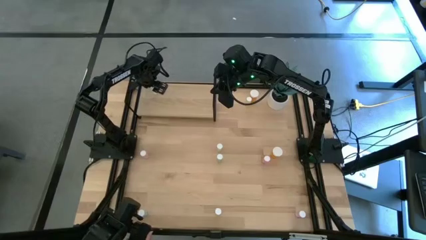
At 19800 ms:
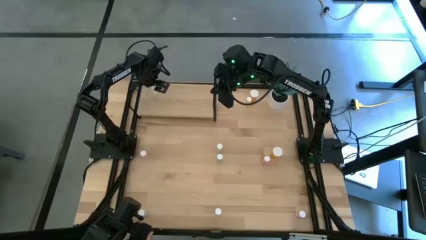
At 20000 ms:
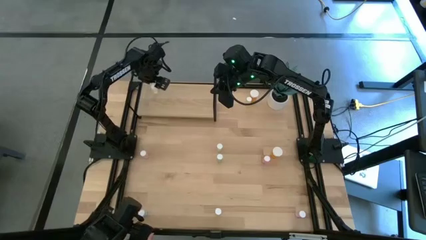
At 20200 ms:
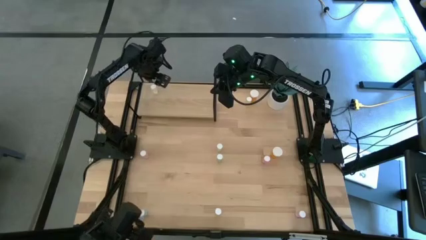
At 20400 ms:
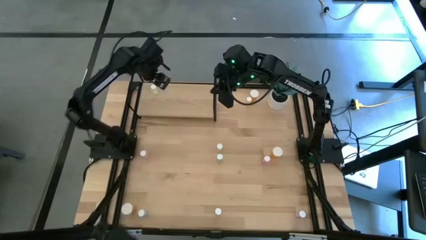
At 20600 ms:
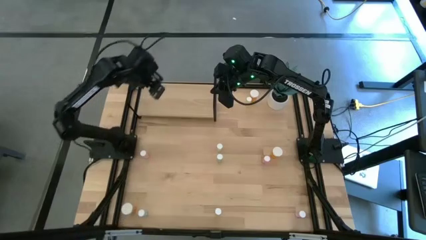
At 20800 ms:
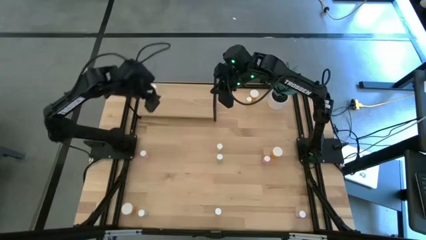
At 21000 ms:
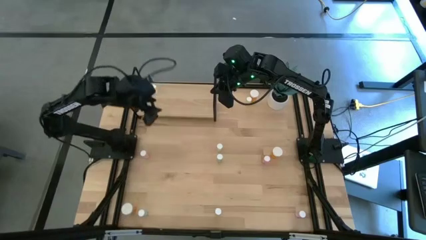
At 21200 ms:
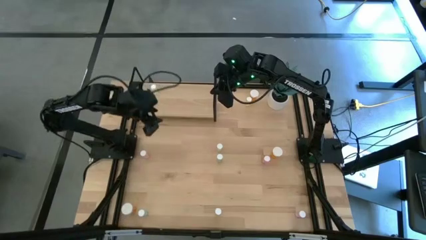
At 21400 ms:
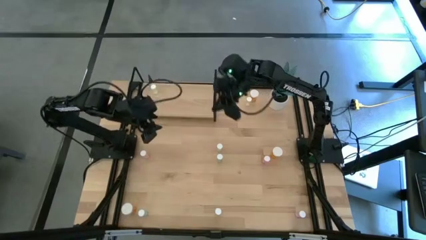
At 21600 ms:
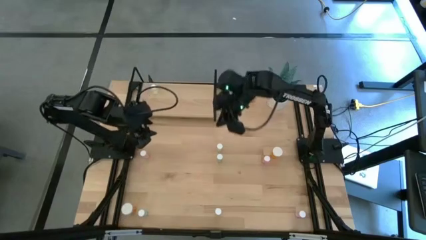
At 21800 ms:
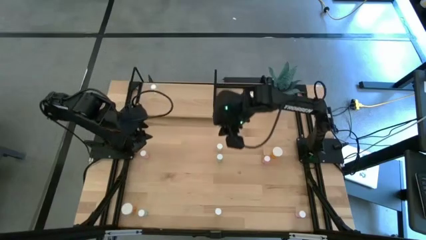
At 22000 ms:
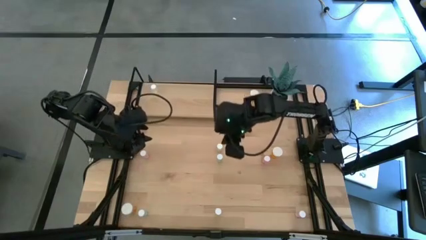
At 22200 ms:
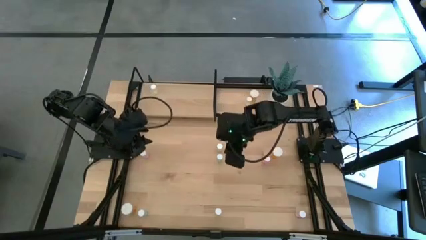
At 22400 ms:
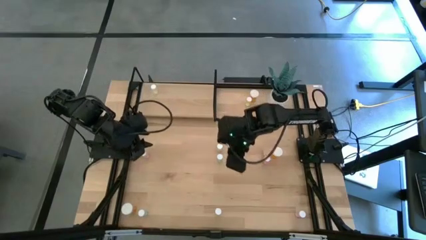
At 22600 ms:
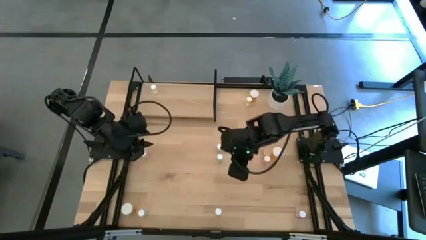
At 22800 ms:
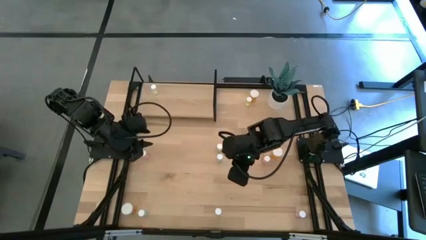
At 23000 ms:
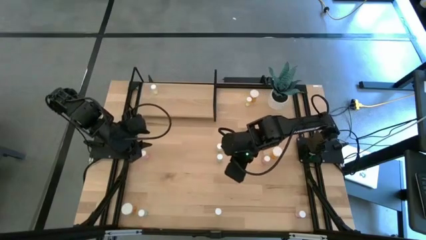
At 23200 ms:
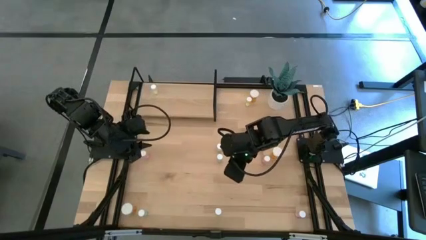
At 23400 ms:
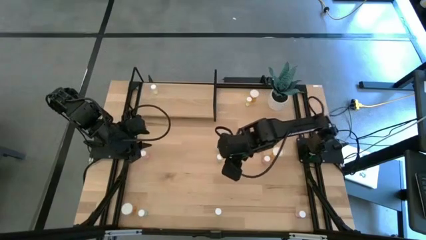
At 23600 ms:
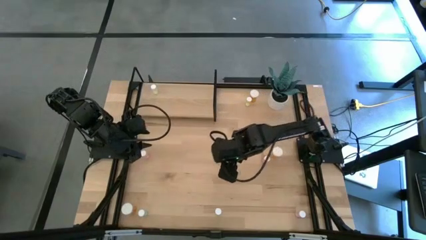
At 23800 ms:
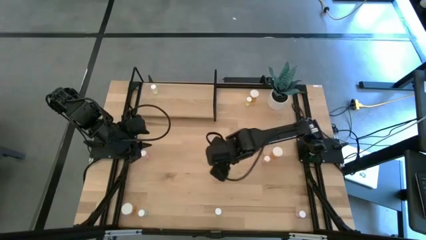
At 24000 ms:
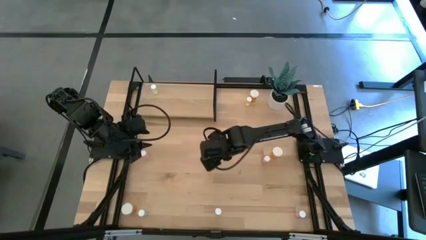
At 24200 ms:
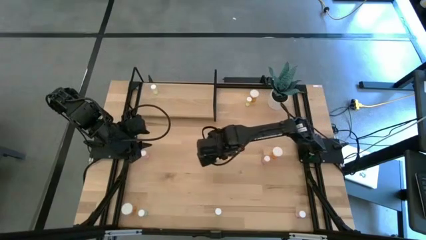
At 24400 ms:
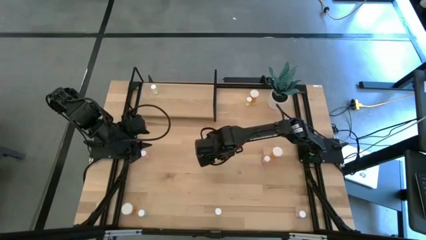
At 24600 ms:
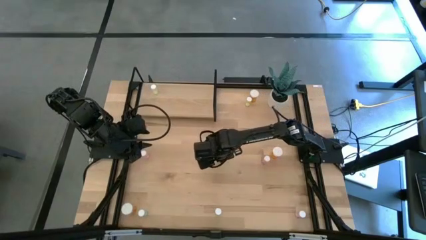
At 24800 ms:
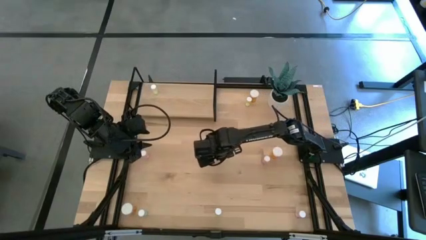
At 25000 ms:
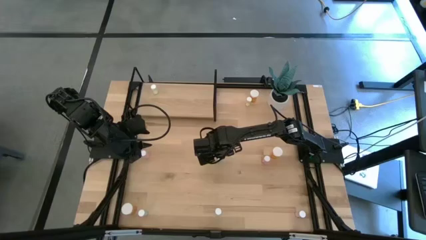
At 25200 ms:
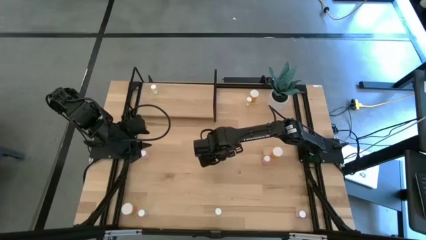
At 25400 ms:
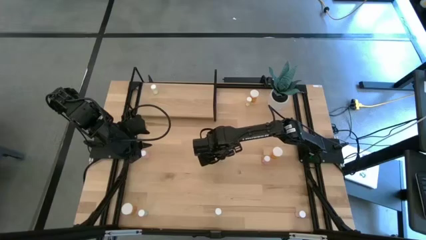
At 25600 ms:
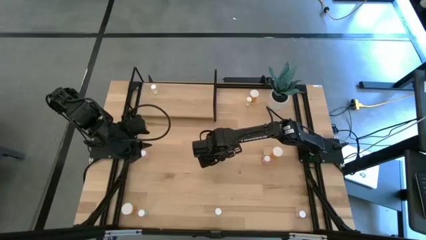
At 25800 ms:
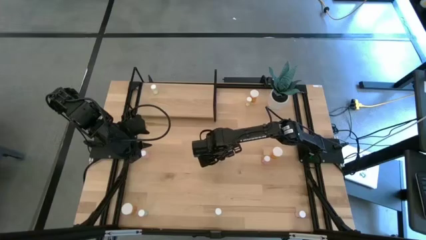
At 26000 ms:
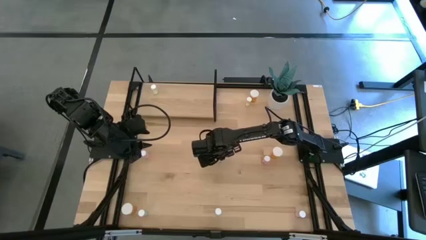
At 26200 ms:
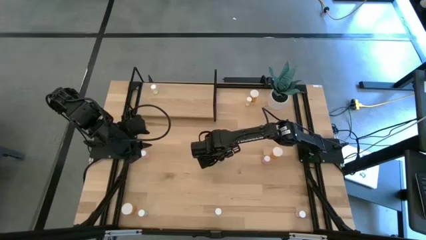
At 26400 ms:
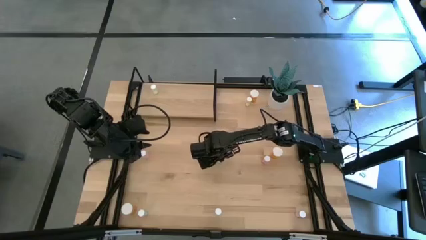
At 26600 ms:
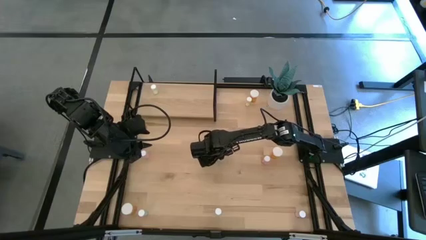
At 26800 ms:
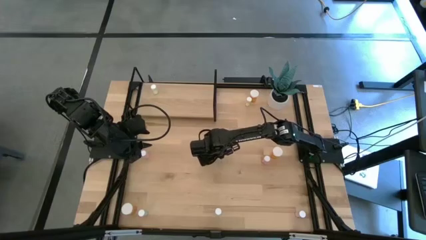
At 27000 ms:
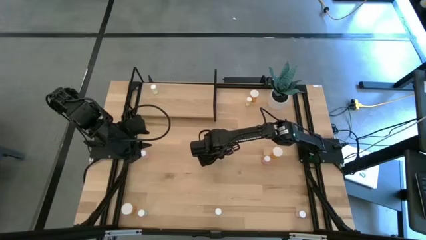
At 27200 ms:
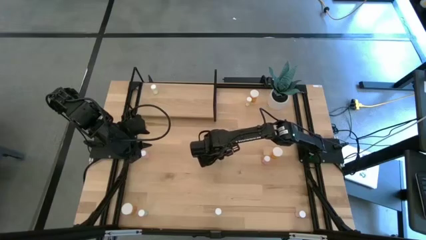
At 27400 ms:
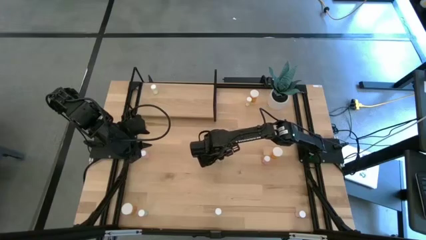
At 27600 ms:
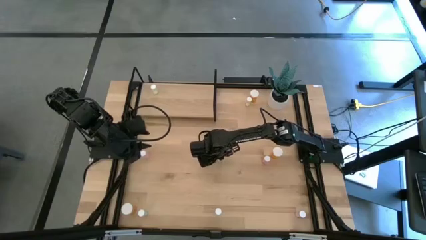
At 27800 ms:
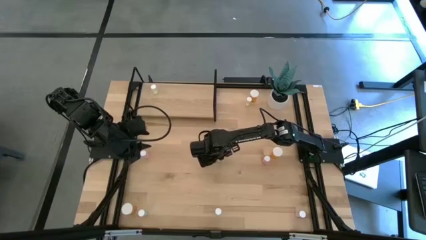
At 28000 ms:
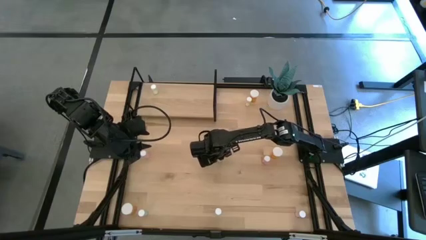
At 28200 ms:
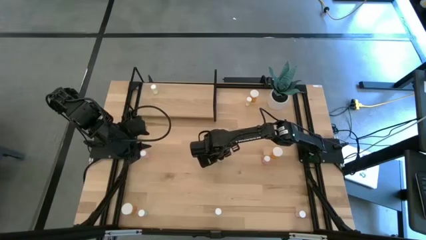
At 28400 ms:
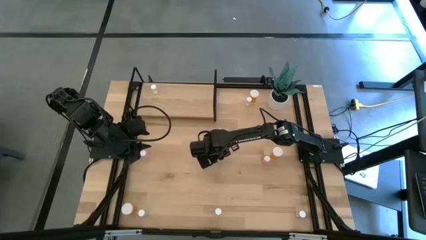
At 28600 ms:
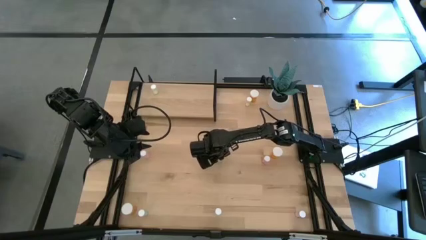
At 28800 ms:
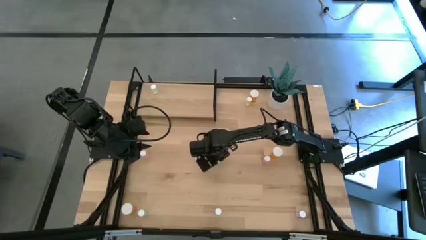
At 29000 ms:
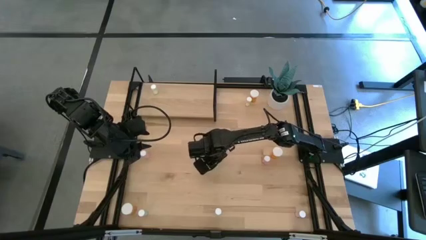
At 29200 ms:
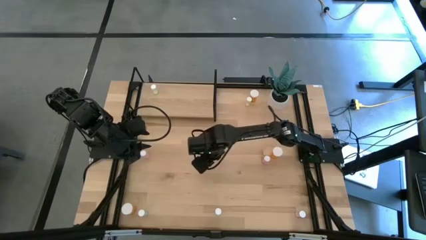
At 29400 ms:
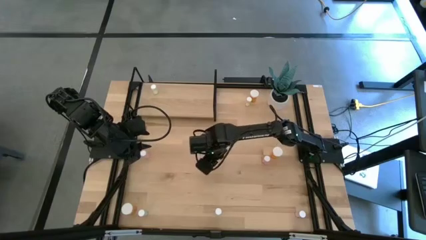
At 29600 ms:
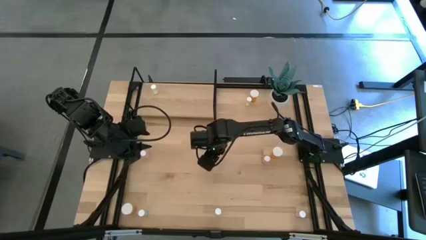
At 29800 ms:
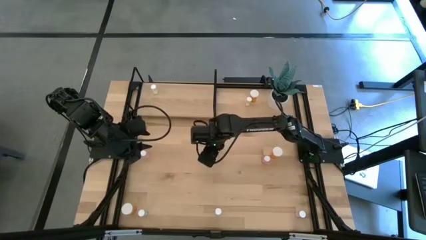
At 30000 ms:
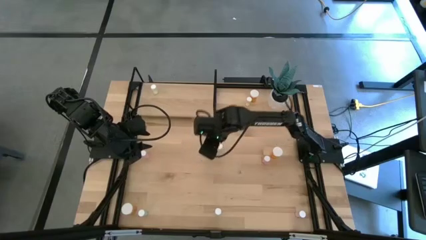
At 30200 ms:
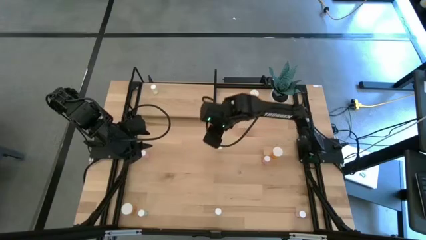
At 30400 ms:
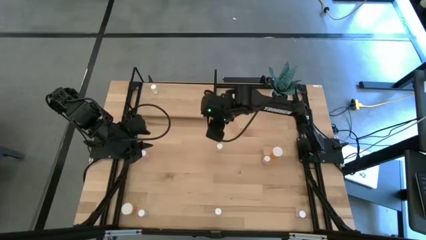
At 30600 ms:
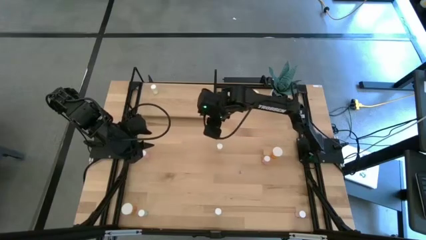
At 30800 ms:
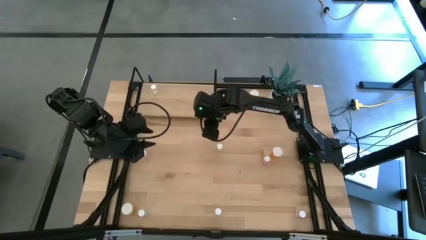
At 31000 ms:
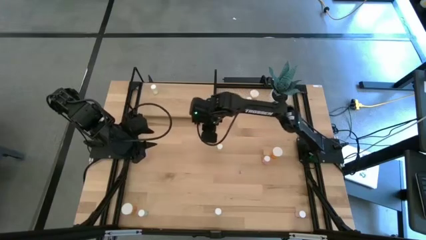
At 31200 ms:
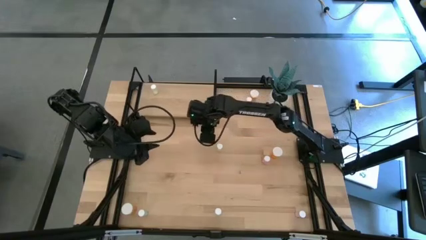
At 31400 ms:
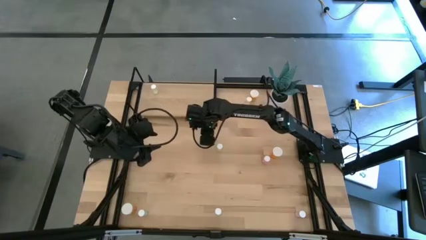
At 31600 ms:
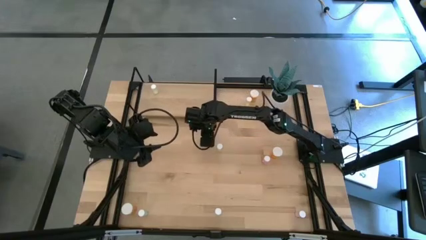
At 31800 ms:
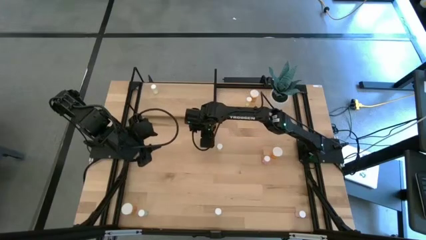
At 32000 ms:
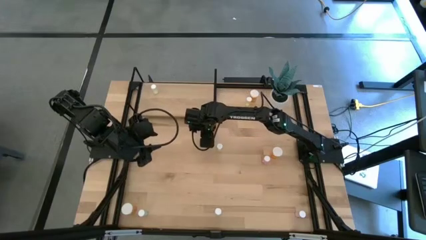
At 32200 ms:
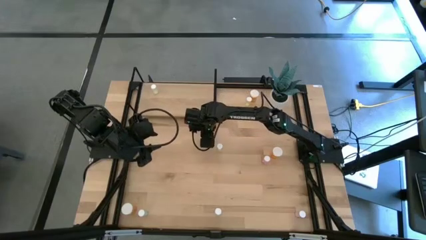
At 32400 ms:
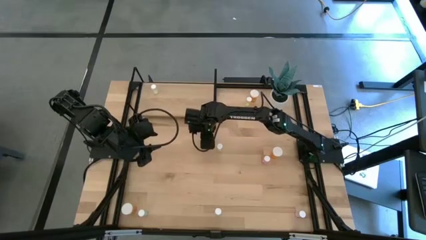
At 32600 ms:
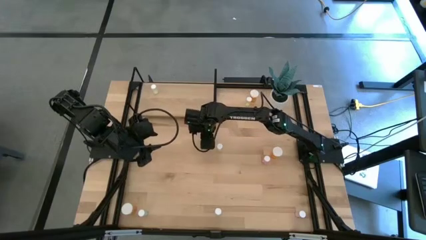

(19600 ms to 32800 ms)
Task: Pick and place medicine bottles onto shelf by color
Put the top green pill bottle on the shelf

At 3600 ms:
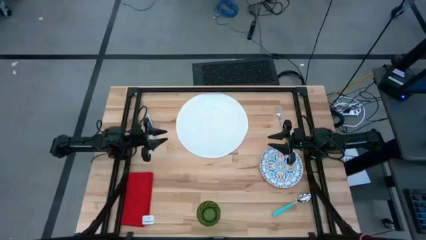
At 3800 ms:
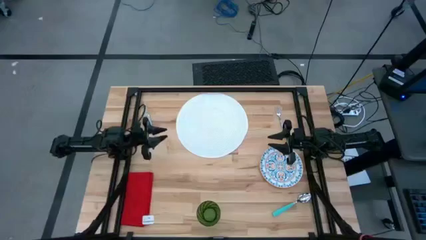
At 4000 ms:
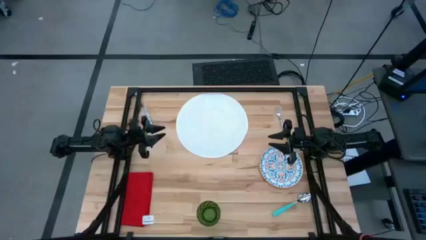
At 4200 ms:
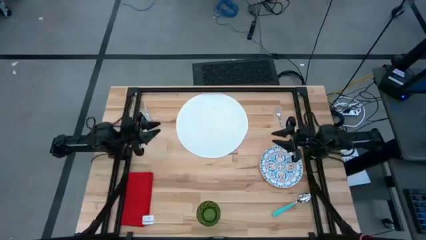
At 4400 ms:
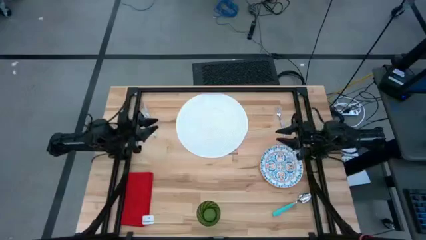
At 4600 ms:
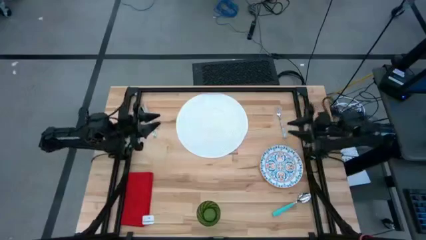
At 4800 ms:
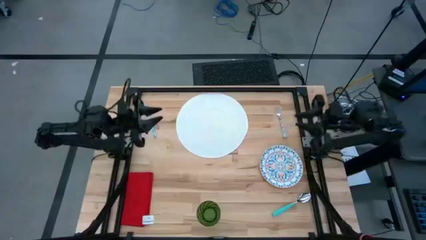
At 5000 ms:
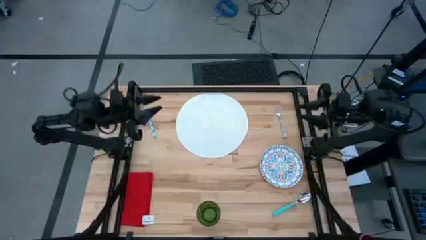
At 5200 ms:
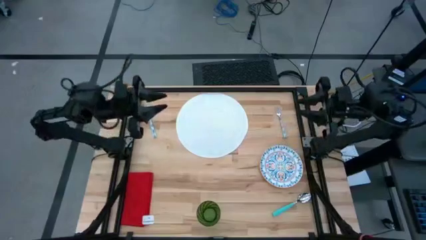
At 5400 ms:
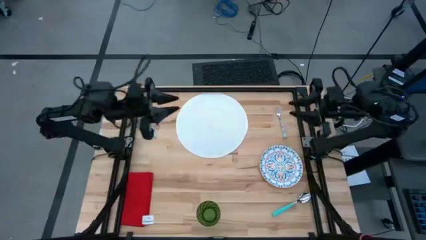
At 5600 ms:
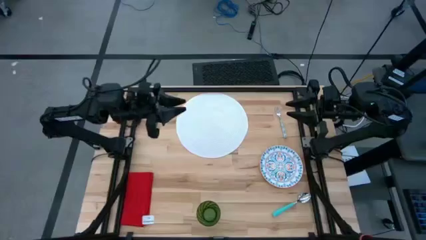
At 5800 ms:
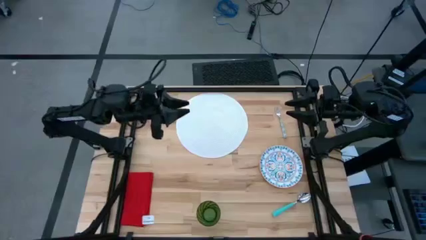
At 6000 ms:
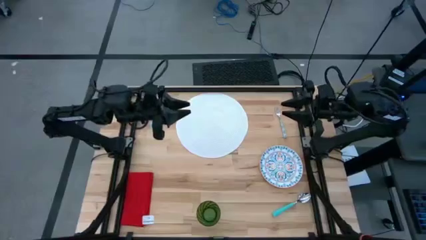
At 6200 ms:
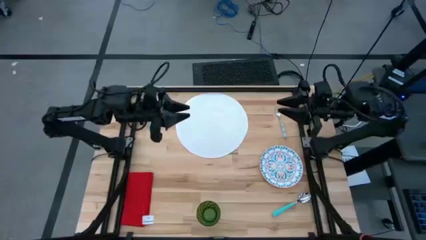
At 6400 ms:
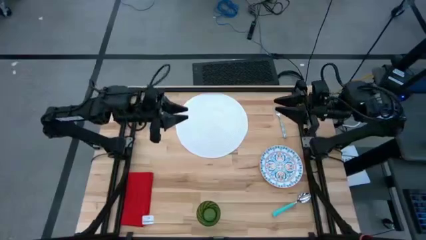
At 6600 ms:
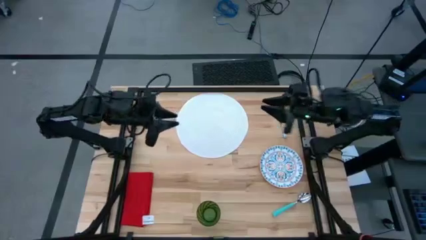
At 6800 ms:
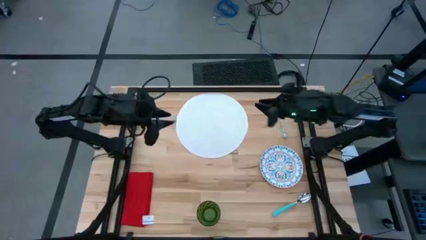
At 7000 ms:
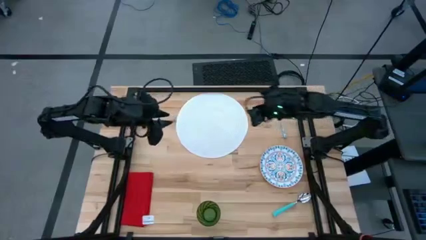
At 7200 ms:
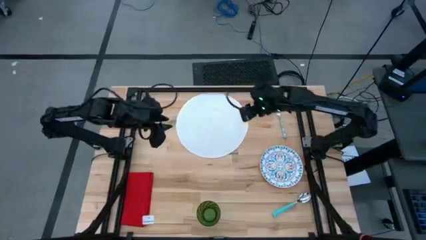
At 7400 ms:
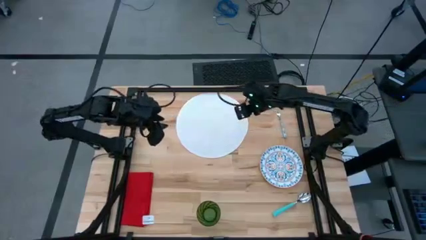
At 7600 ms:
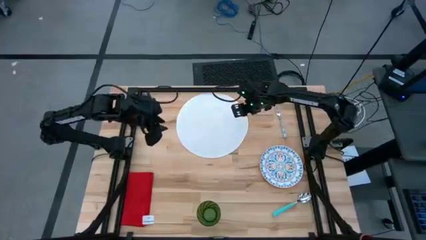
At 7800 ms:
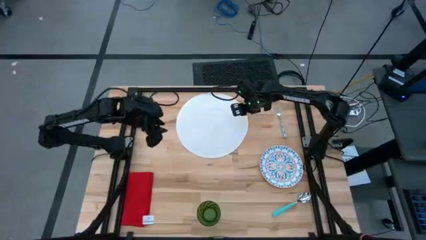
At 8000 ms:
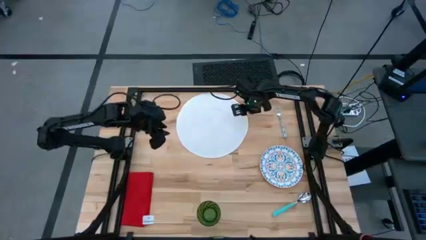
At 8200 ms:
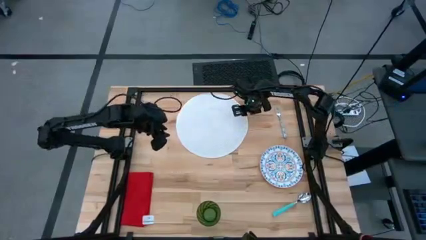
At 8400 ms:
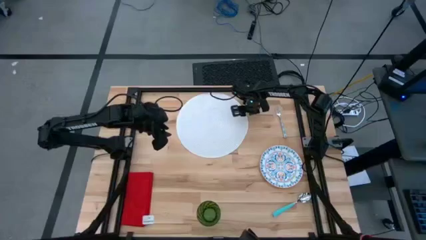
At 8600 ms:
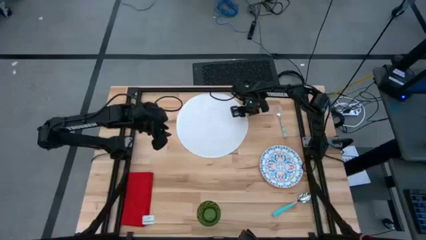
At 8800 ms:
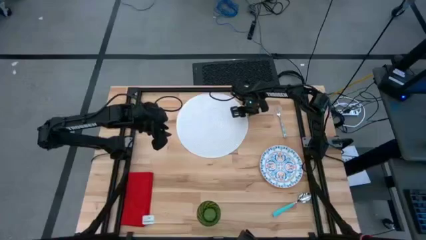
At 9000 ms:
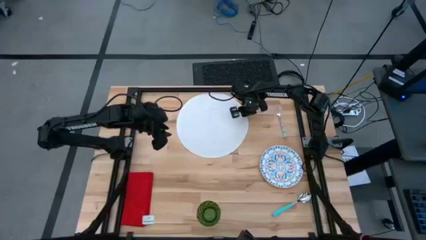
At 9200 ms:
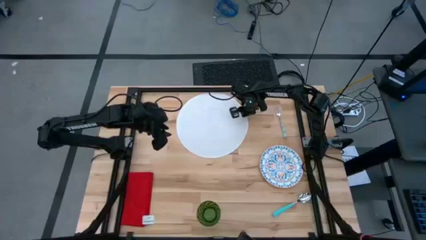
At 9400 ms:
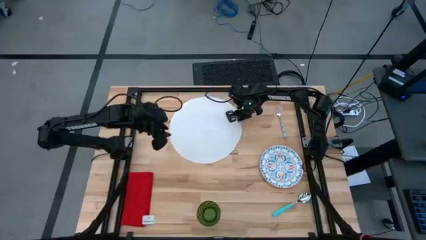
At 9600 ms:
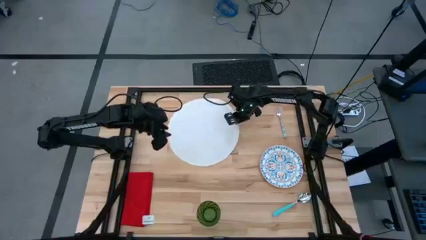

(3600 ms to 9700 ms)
Task: Set table place
Move the white table mat to the center of the table
